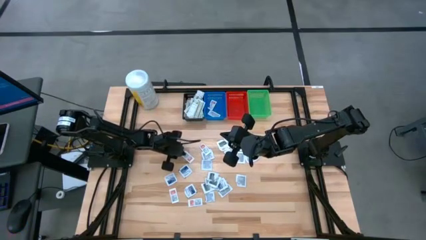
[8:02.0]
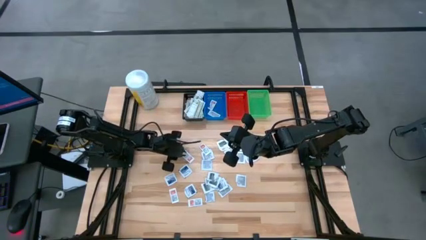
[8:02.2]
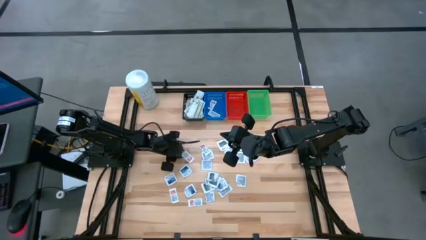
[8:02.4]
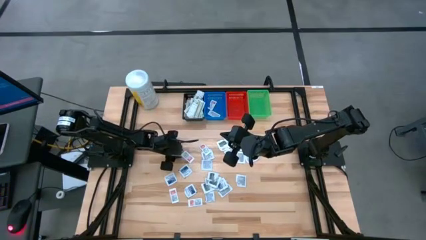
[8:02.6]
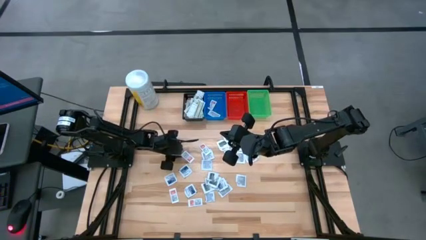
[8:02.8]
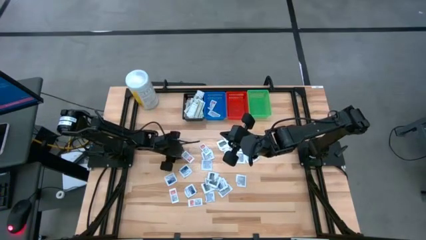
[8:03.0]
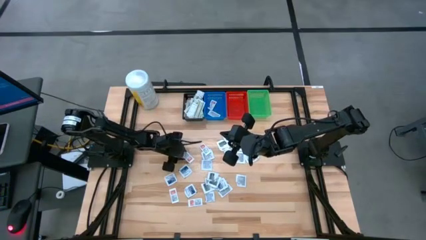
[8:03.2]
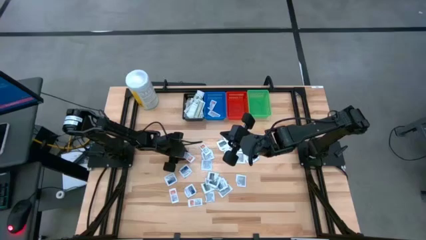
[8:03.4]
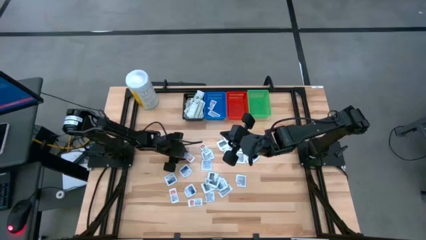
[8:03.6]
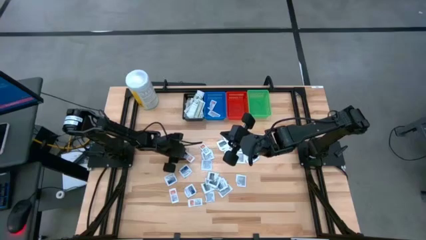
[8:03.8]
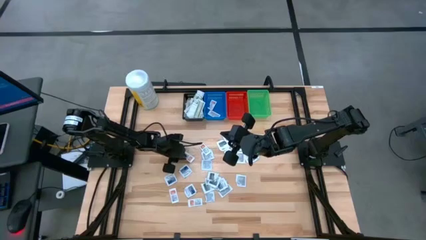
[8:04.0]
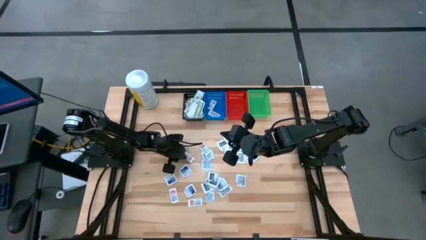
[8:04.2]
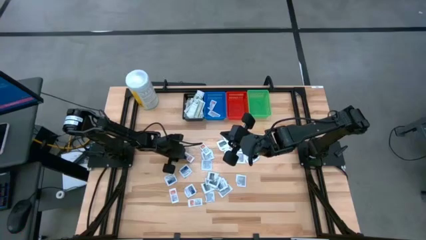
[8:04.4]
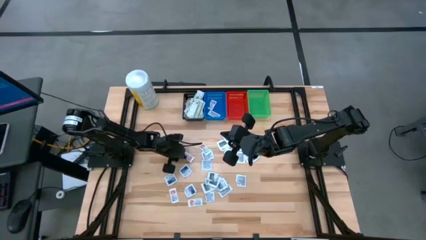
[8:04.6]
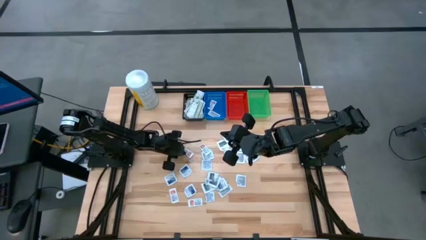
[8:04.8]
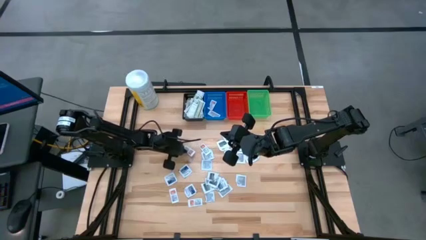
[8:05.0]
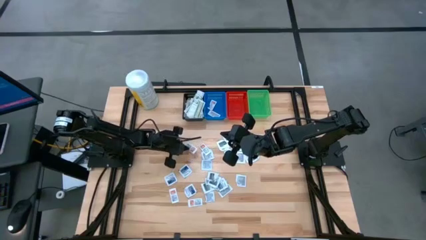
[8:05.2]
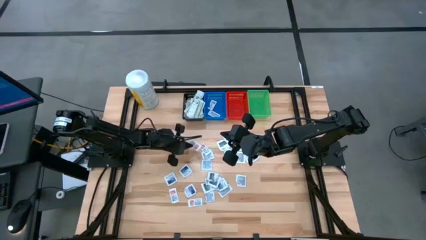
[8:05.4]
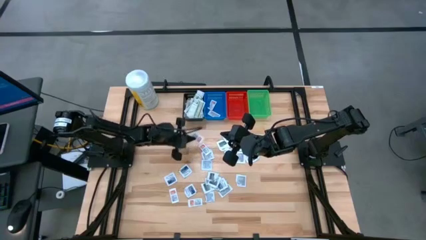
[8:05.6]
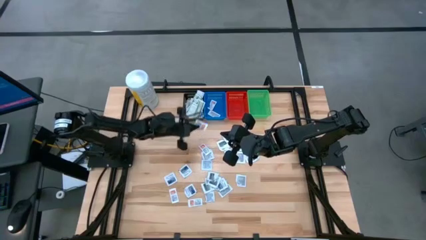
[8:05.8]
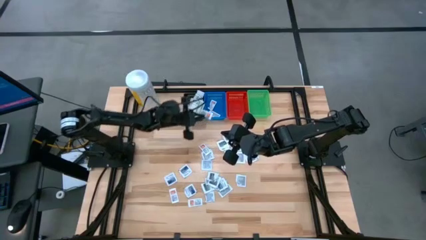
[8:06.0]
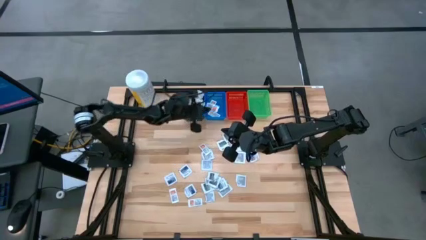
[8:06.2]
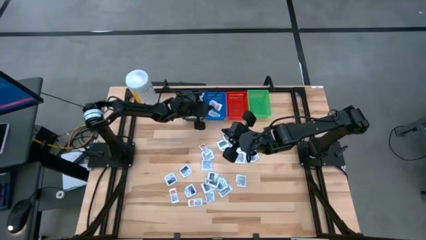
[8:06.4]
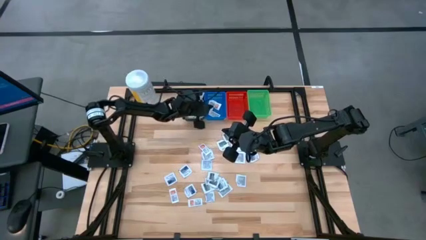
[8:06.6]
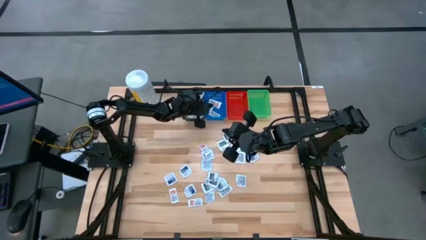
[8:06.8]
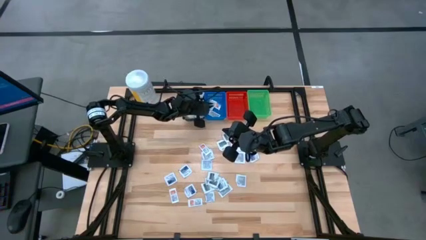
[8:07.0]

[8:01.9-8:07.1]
Task: Pick & Place First Aid Supplies
Put the orange ointment pack in the blue bin

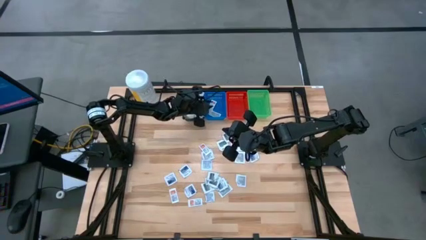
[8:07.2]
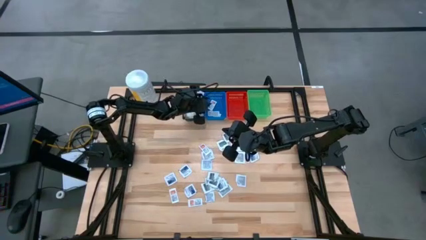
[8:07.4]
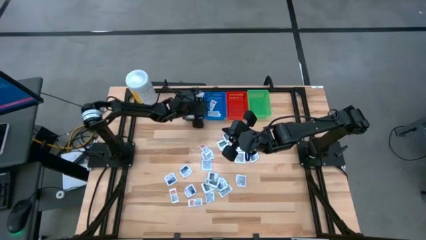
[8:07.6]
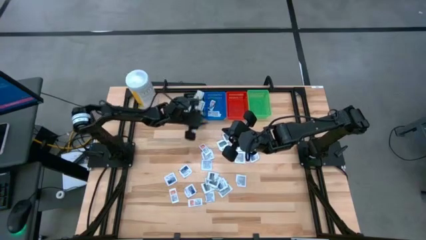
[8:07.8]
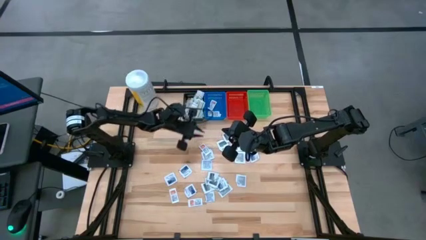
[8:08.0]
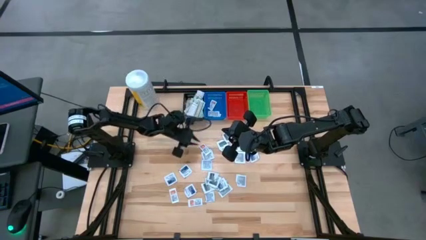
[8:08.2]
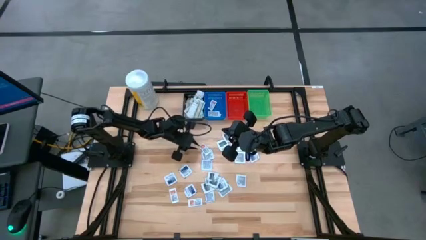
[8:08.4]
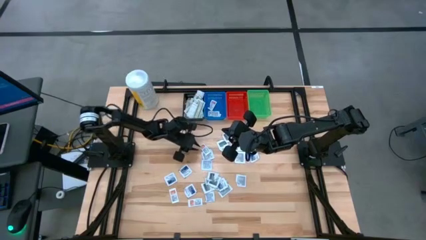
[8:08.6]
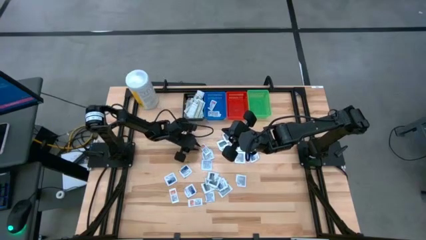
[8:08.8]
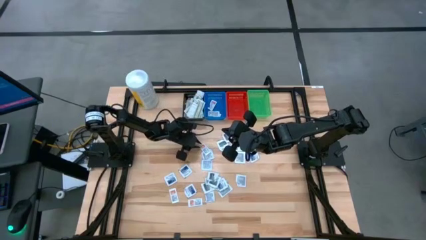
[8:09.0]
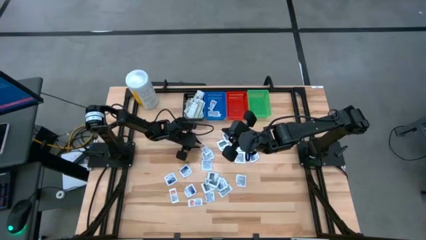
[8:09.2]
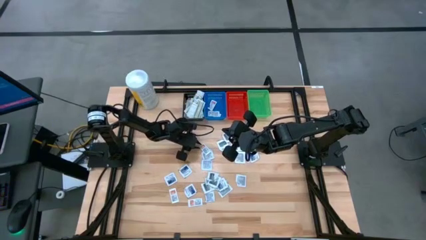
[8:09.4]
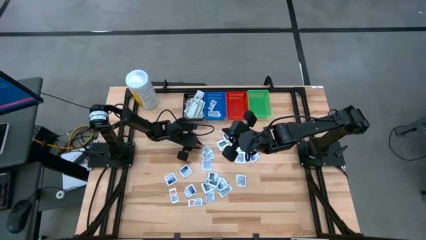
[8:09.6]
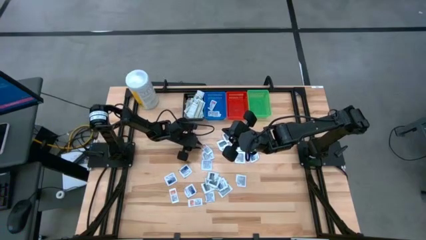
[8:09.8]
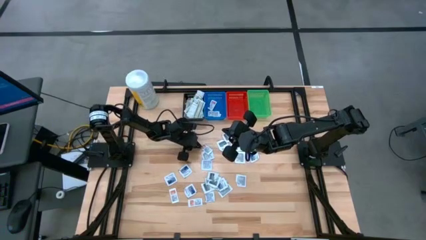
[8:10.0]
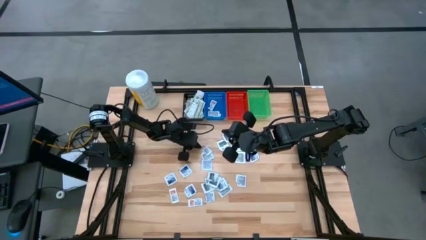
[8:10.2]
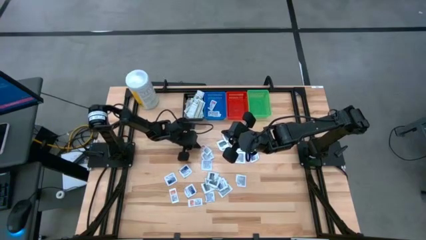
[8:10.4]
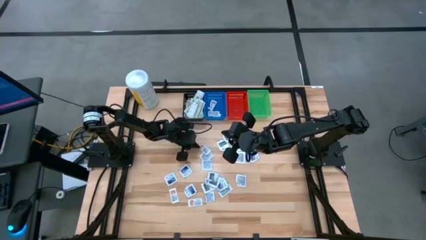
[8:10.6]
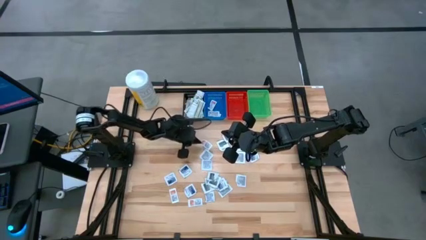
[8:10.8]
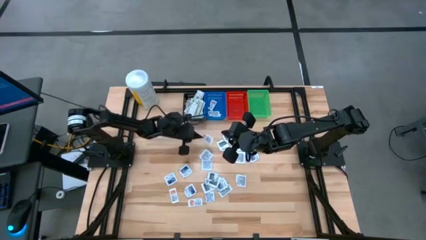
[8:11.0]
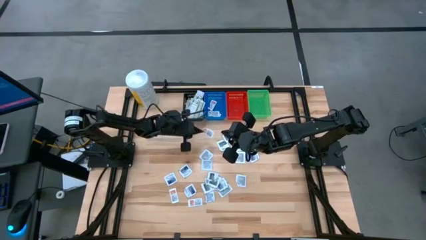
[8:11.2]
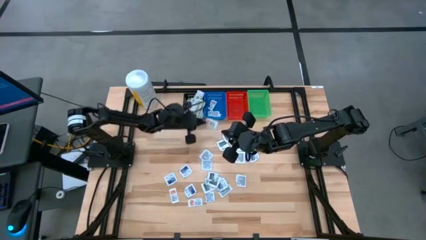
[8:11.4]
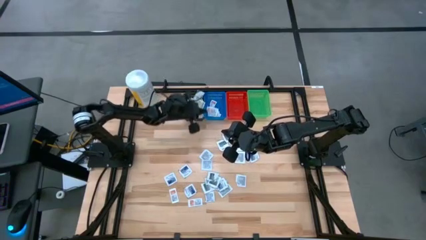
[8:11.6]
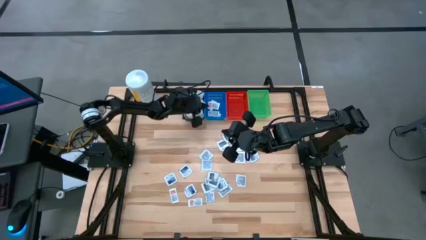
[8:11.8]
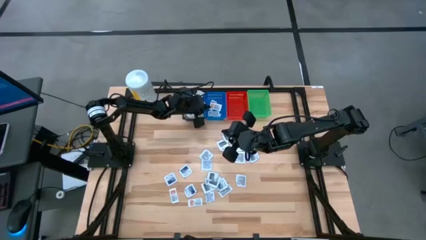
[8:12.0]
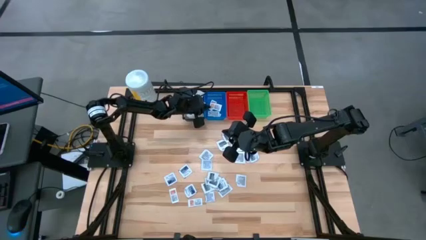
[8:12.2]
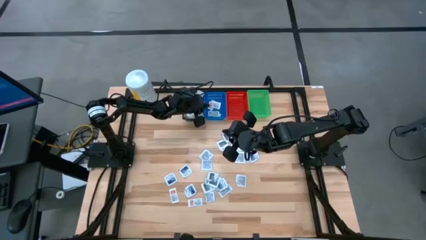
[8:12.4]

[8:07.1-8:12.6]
Put the orange ointment pack in the blue bin
